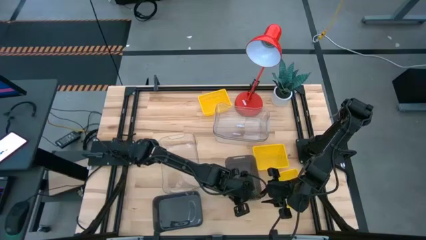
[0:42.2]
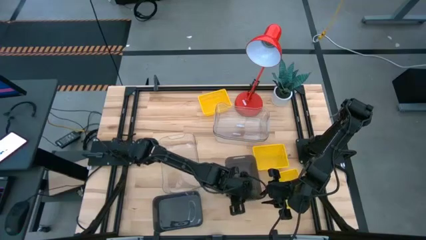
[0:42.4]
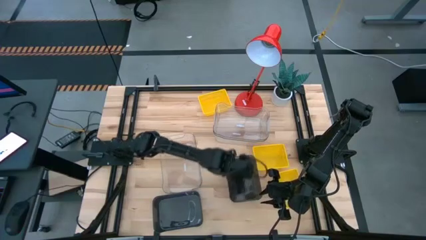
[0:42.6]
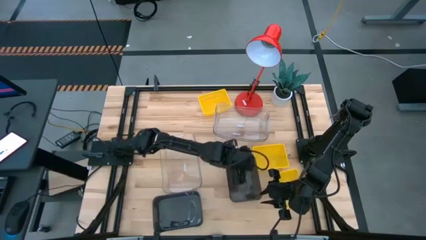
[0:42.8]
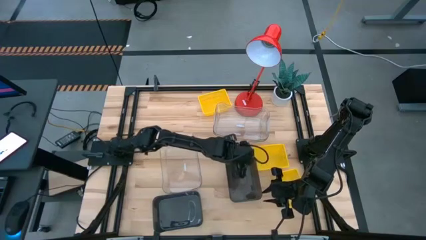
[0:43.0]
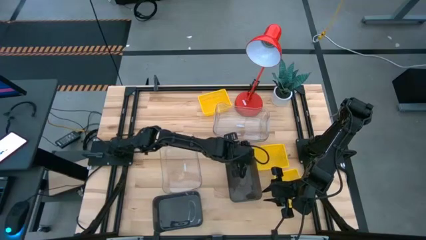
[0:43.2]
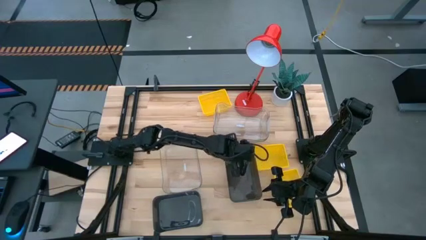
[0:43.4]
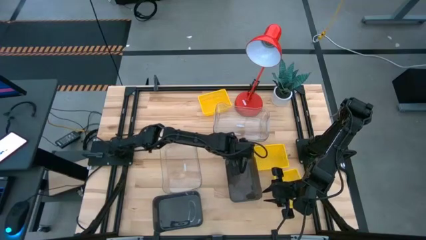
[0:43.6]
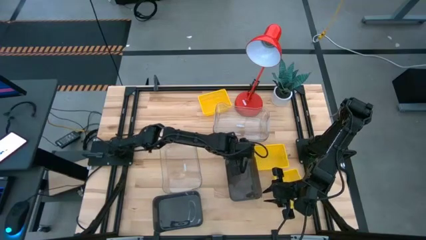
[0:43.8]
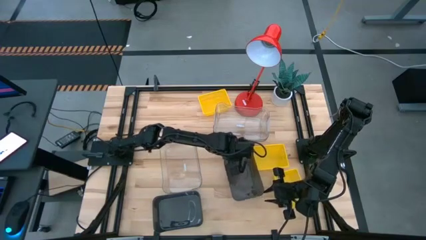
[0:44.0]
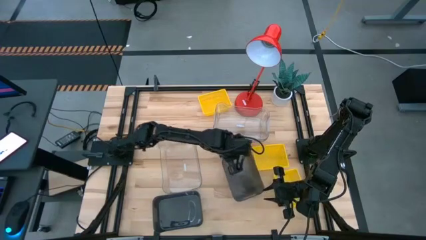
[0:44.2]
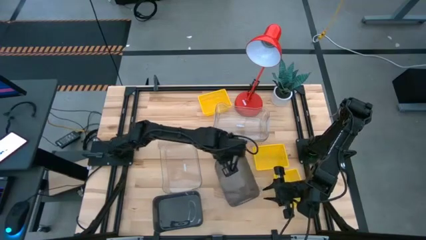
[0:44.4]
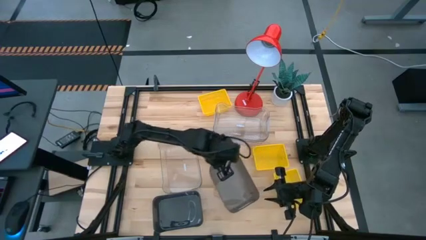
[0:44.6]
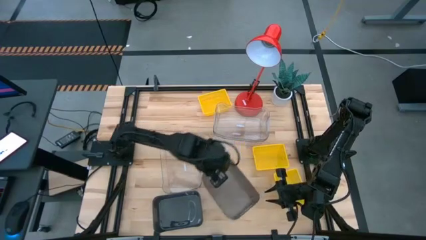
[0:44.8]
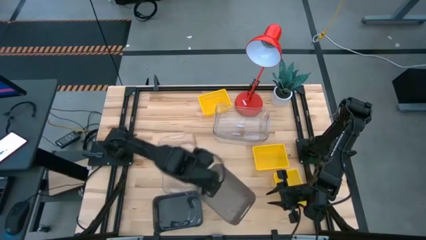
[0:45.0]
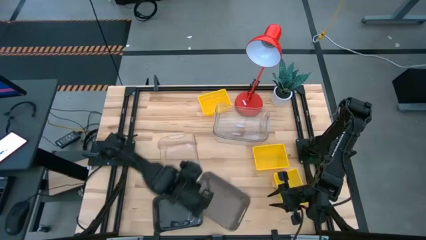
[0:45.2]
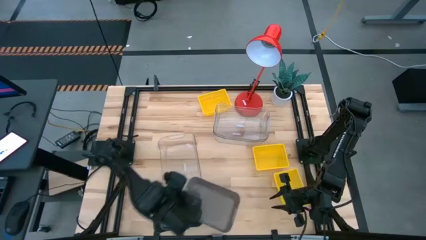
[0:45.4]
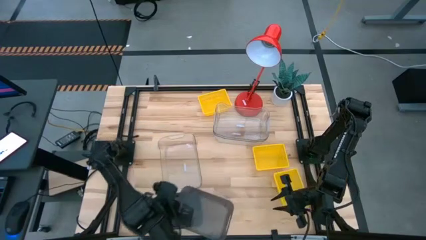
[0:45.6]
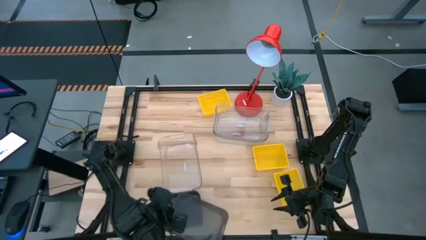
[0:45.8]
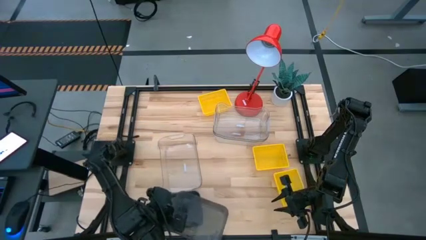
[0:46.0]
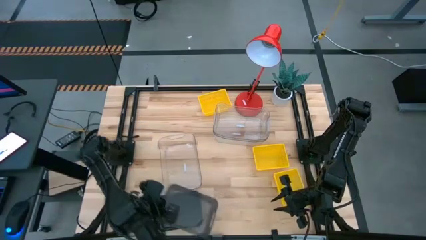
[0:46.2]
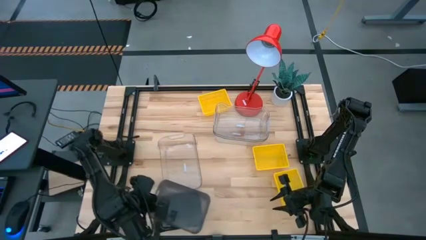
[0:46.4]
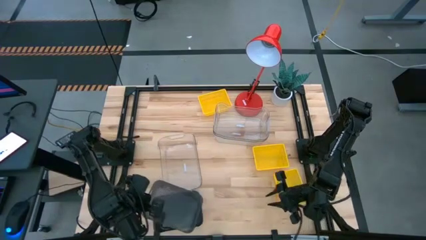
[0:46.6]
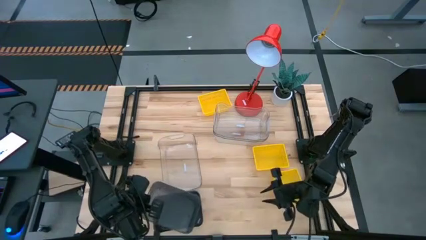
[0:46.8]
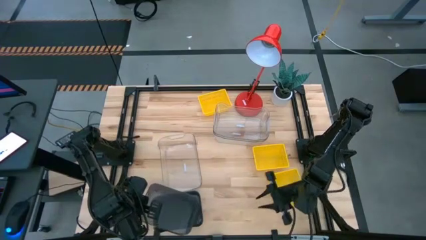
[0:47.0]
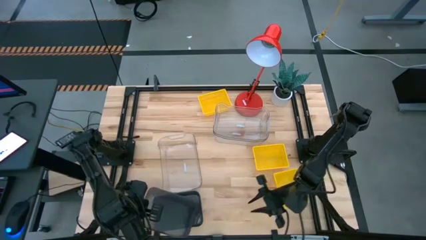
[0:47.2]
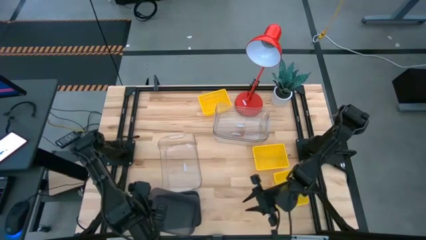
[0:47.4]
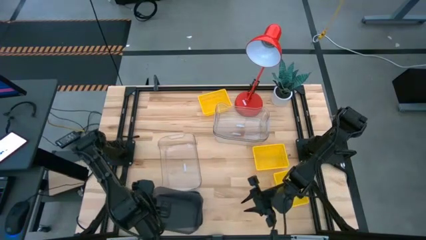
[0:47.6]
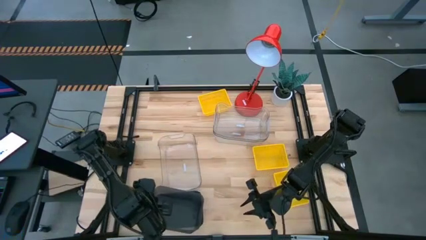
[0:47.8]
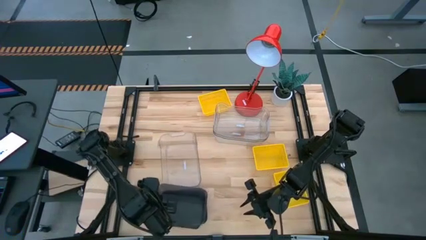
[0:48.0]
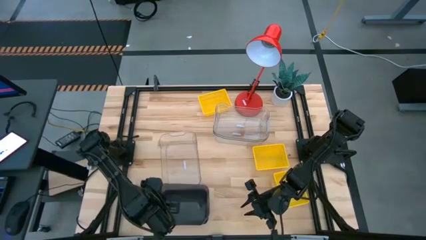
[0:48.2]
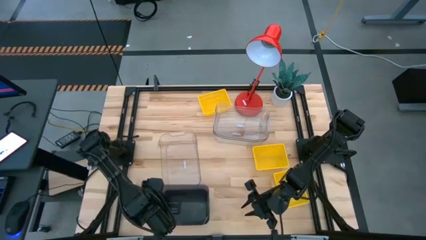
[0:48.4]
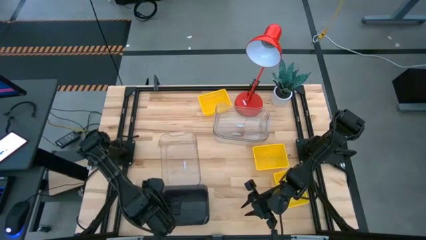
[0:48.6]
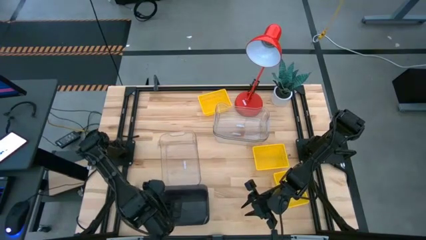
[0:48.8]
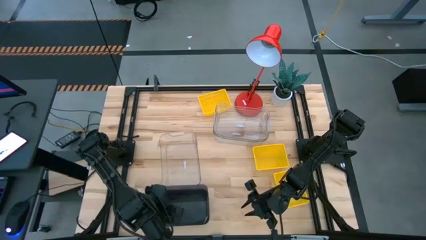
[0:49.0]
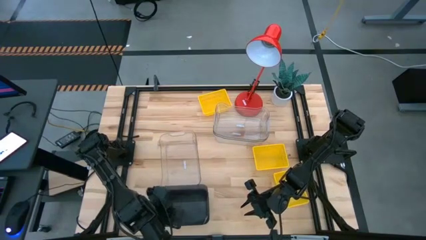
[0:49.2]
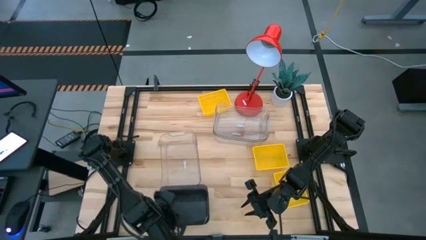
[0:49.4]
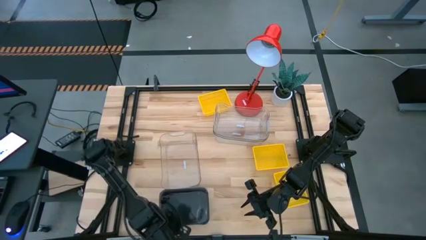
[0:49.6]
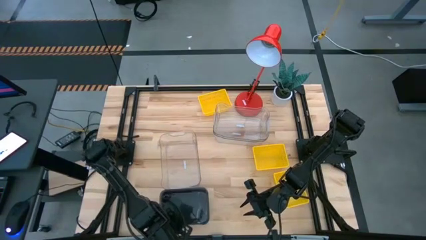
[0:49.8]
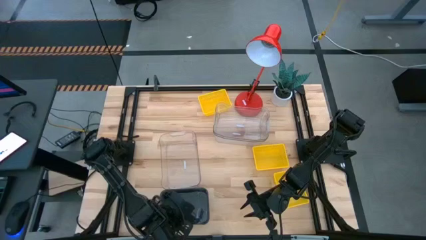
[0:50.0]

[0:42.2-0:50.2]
Stack the black bin on the left black bin

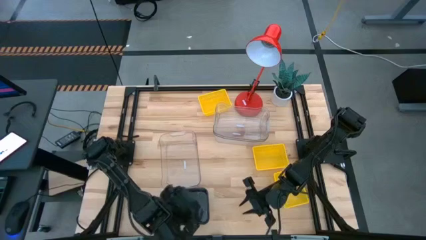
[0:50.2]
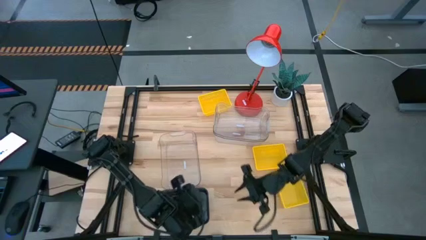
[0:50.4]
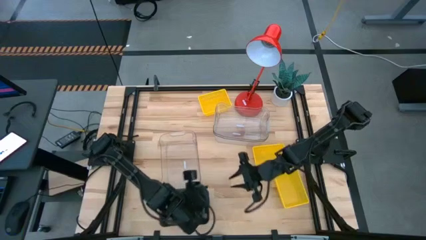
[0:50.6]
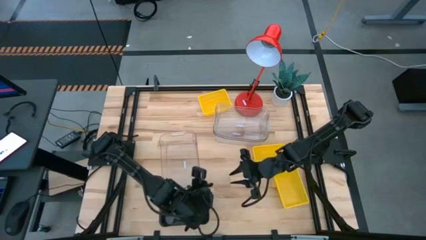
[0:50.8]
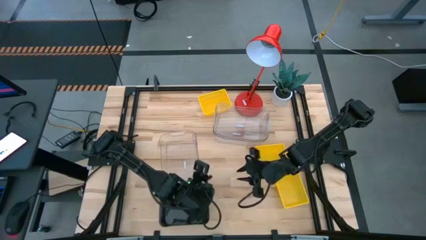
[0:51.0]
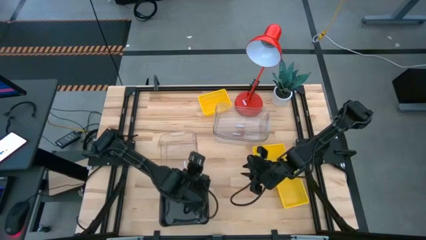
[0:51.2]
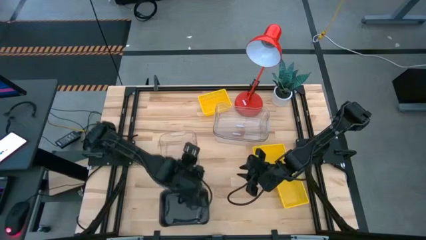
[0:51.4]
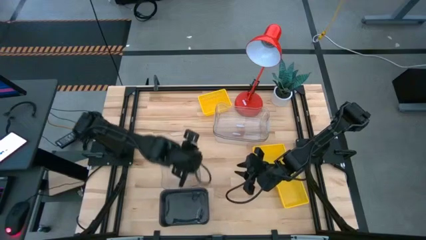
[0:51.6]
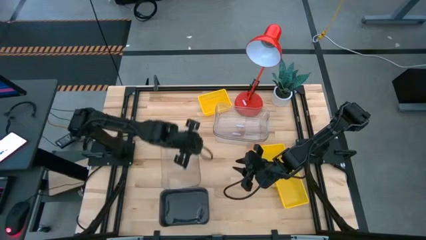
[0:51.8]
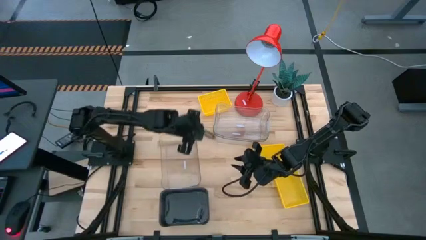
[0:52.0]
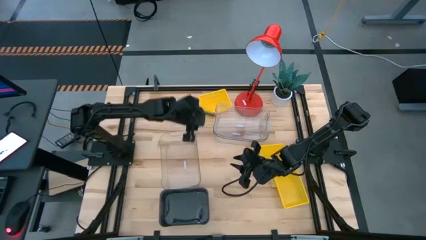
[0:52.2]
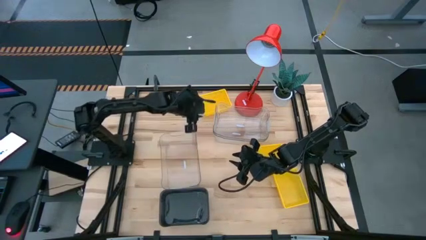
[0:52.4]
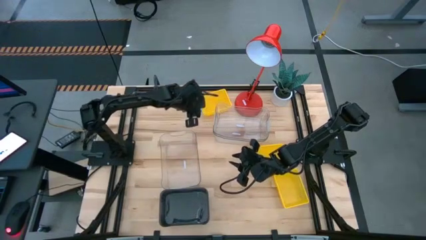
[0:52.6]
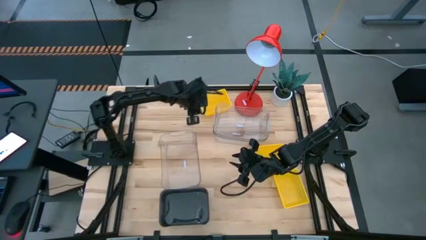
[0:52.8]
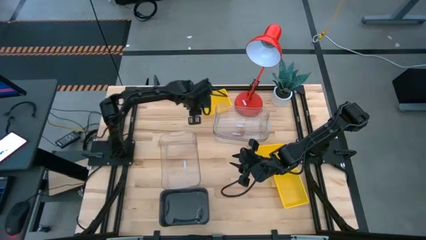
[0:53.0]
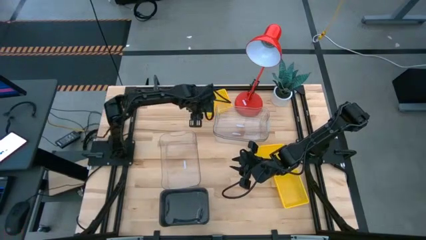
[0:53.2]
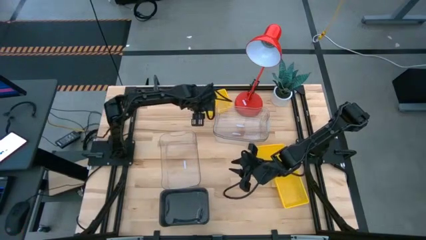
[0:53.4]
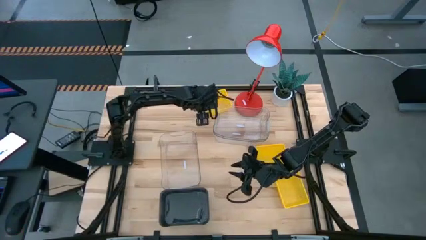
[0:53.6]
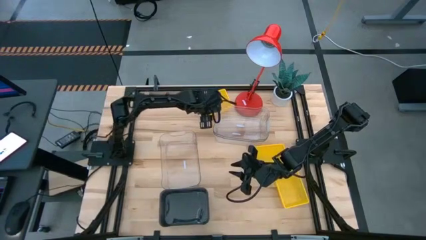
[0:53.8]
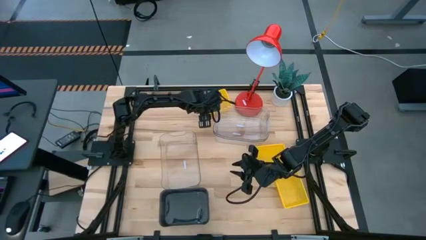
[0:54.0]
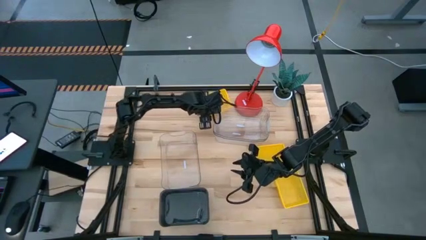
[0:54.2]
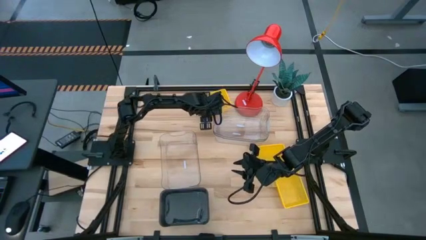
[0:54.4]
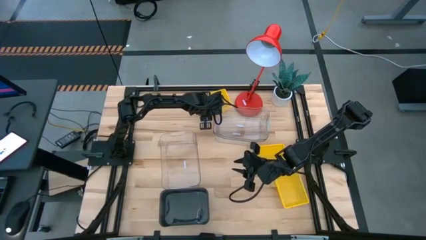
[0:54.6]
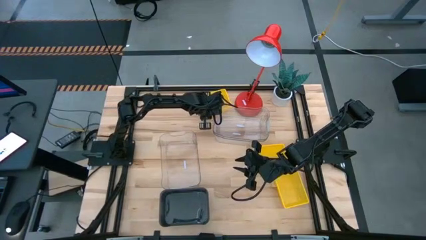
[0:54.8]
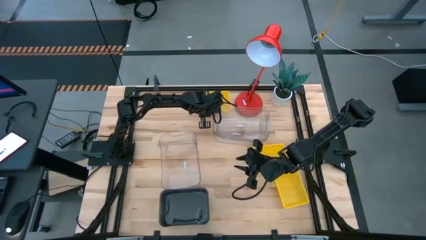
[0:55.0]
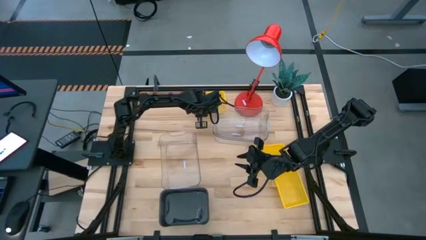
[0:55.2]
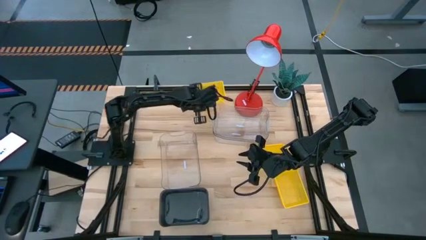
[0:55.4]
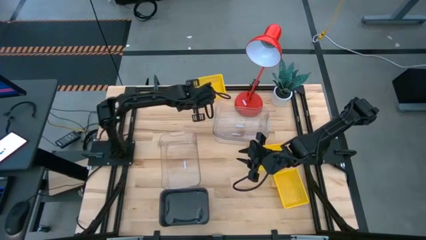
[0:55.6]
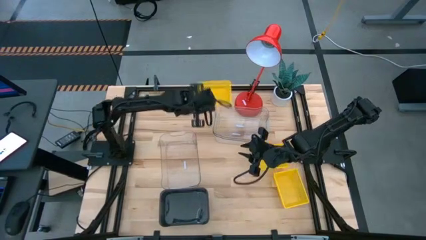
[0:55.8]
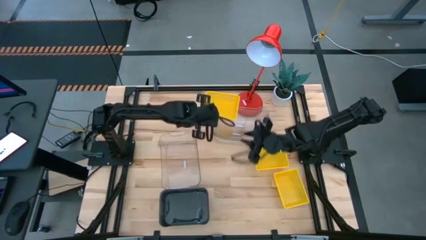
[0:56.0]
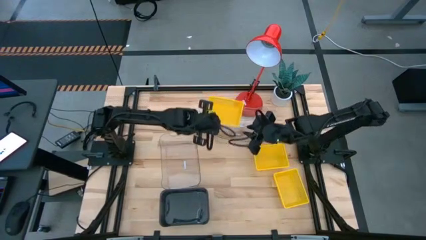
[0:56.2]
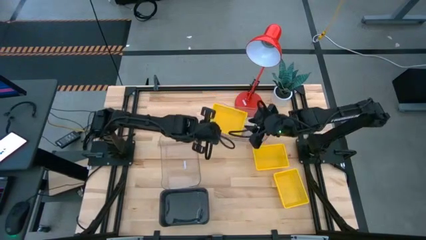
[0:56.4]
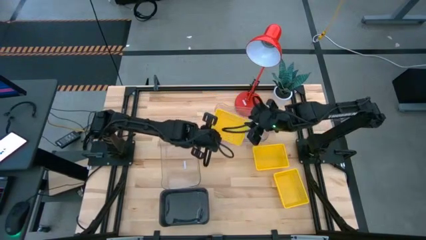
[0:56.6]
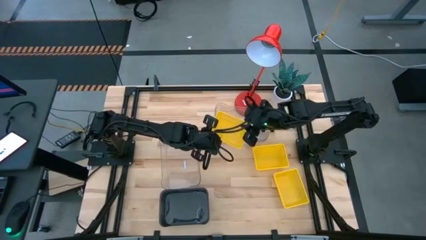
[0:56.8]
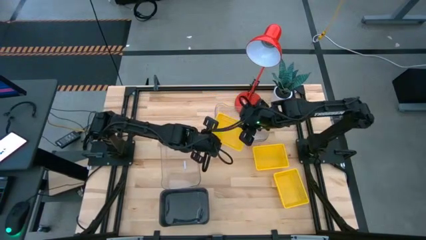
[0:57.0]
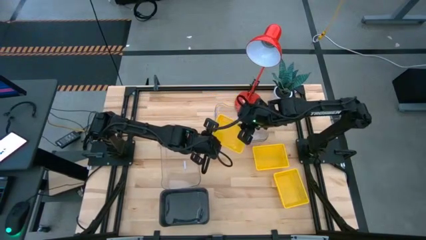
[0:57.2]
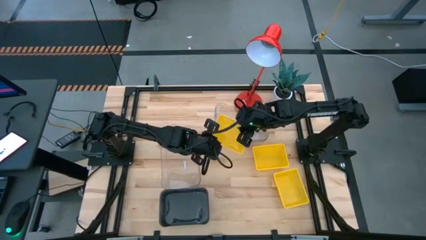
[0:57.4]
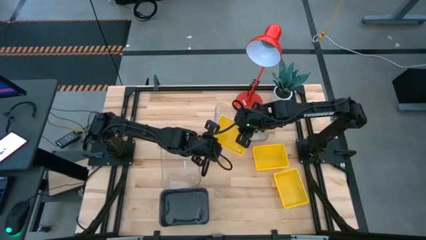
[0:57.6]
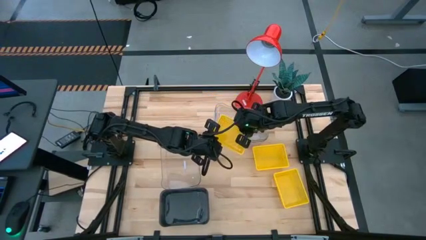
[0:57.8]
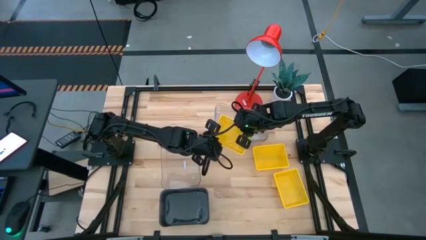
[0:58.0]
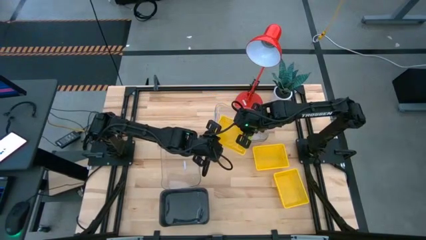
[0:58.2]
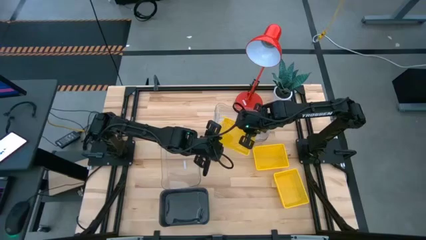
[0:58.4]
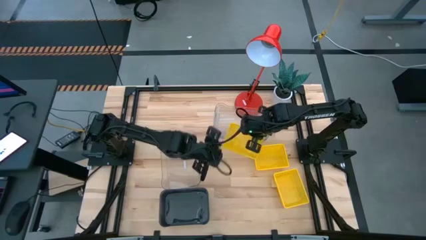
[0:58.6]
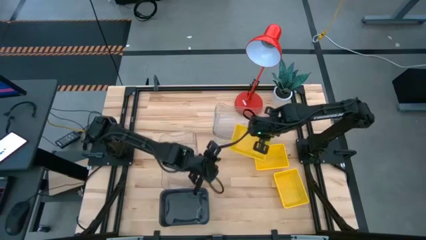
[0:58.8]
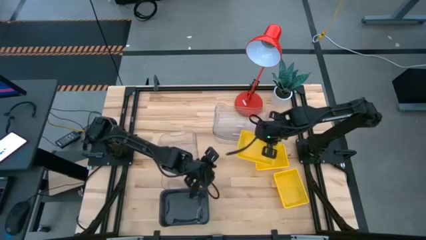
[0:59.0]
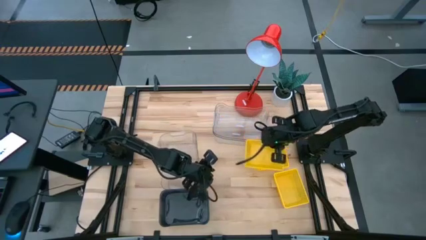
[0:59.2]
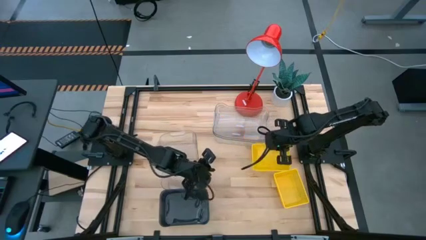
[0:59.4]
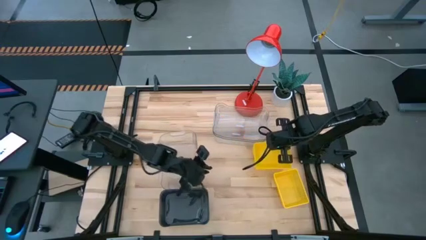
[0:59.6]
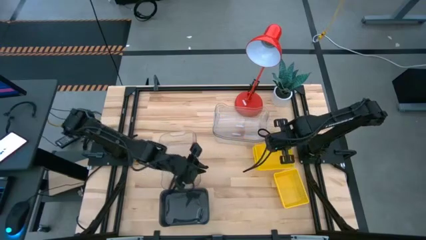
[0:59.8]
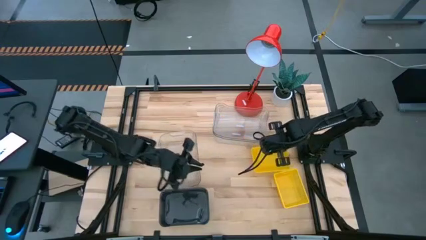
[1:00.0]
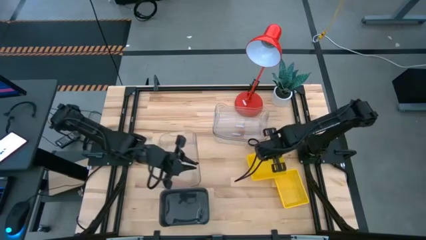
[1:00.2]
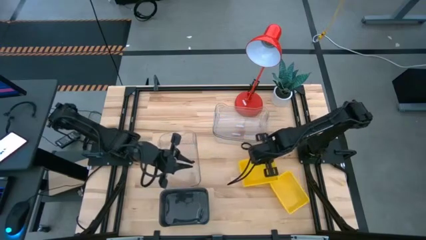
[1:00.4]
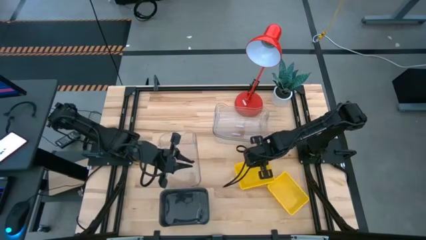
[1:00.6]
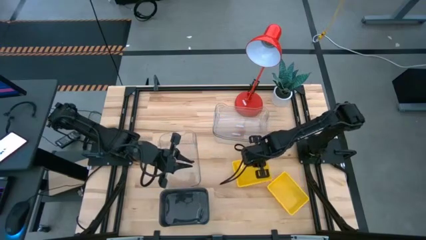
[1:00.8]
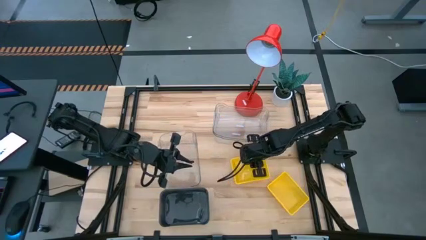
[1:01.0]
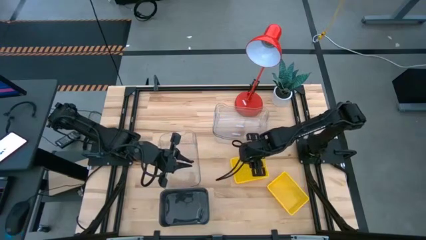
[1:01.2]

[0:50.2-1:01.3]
Stack the top yellow bin on the middle yellow bin
